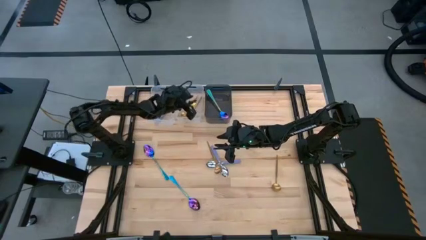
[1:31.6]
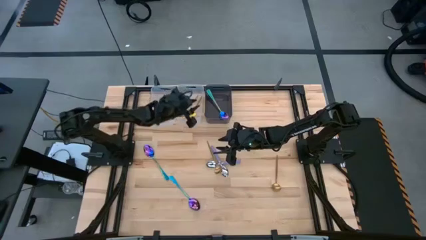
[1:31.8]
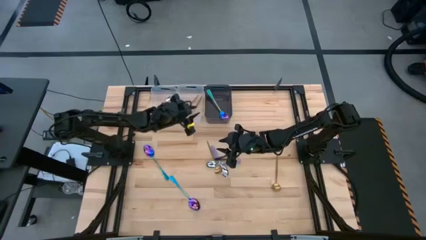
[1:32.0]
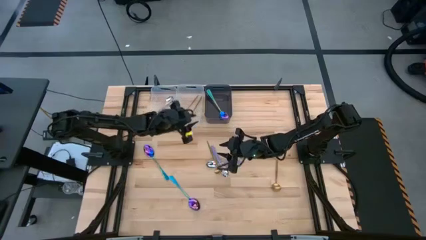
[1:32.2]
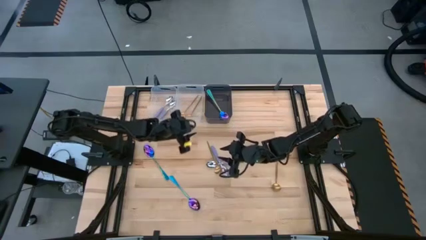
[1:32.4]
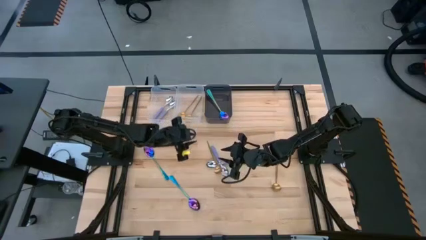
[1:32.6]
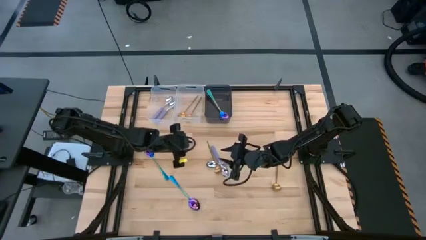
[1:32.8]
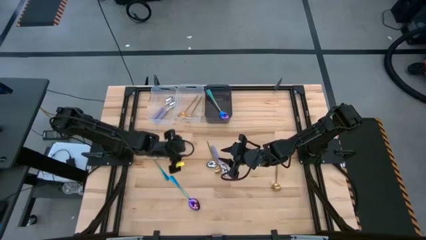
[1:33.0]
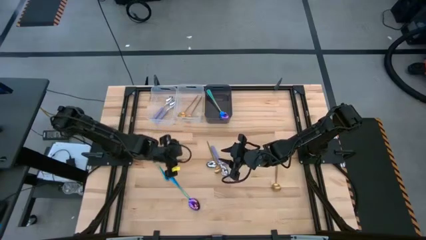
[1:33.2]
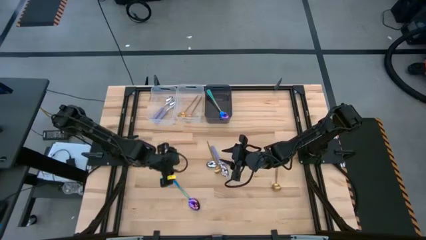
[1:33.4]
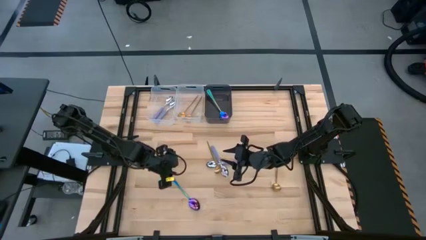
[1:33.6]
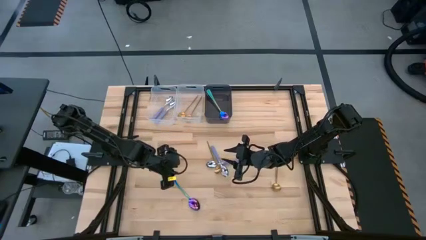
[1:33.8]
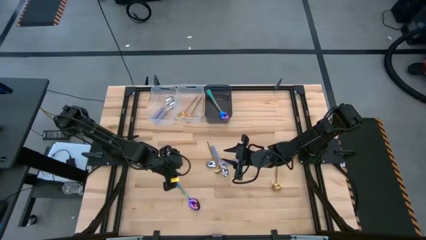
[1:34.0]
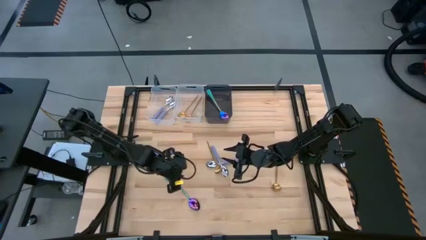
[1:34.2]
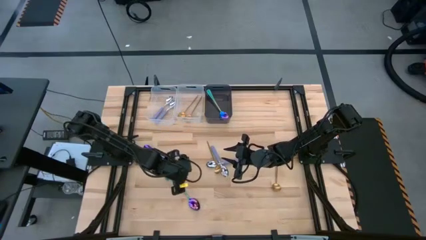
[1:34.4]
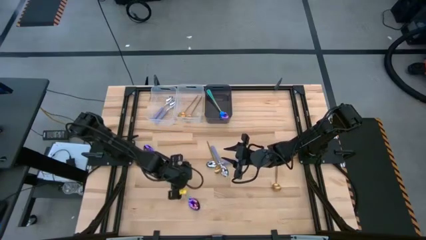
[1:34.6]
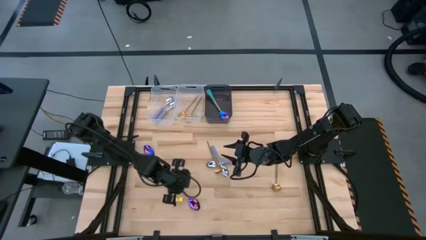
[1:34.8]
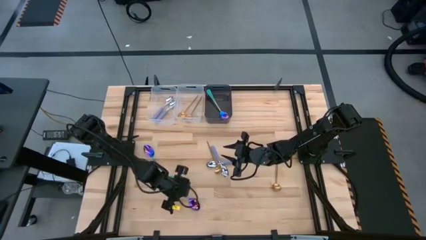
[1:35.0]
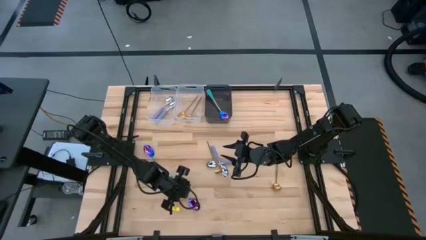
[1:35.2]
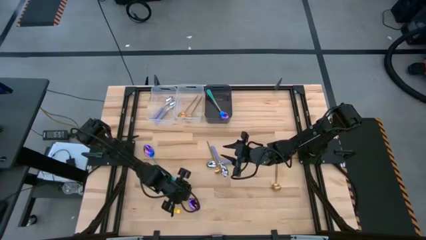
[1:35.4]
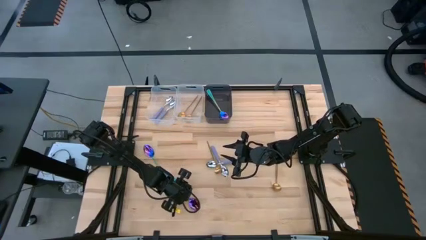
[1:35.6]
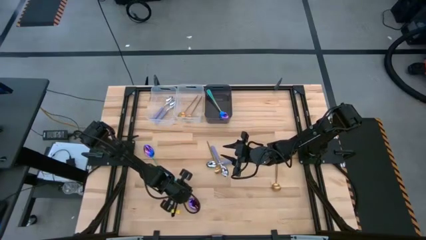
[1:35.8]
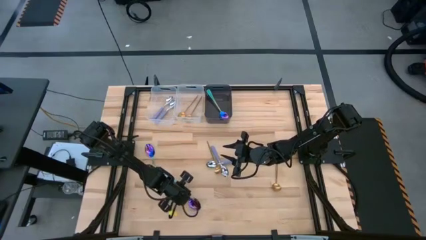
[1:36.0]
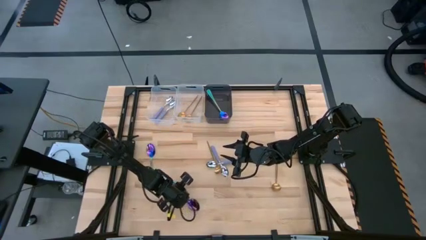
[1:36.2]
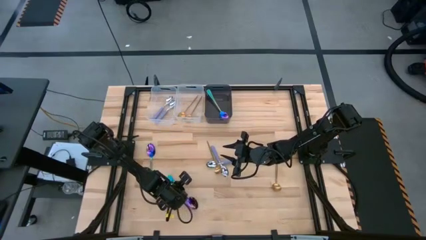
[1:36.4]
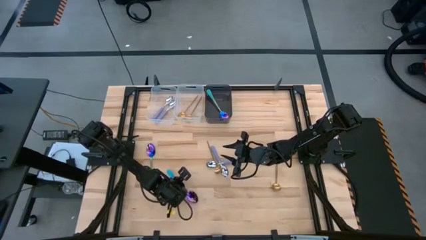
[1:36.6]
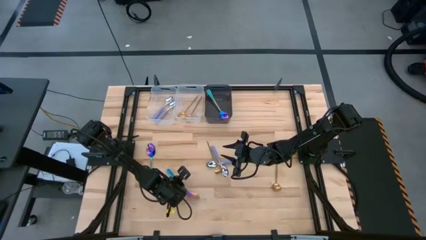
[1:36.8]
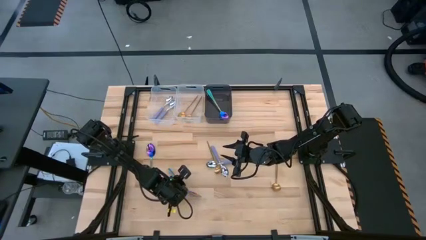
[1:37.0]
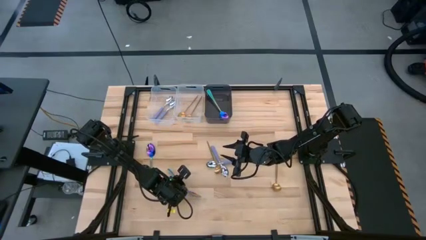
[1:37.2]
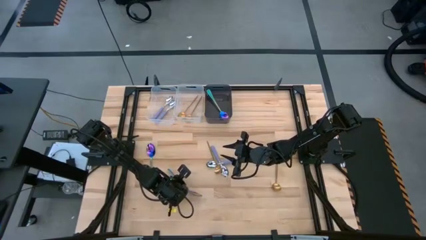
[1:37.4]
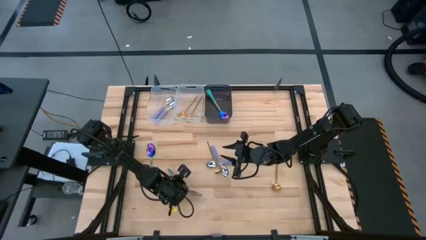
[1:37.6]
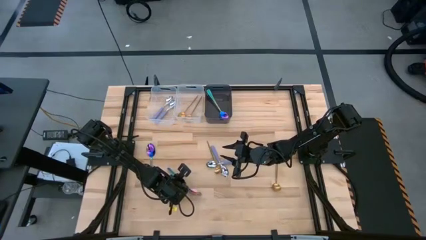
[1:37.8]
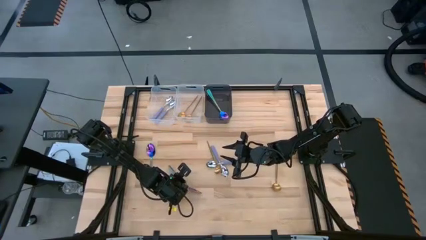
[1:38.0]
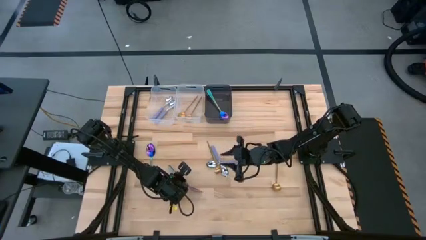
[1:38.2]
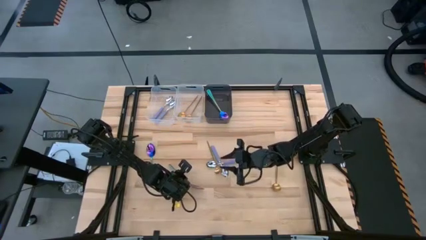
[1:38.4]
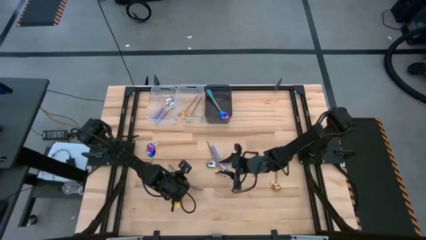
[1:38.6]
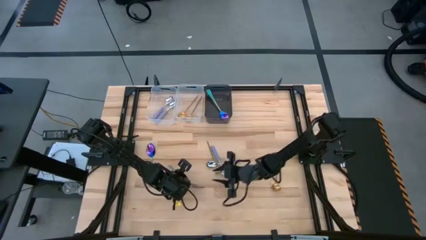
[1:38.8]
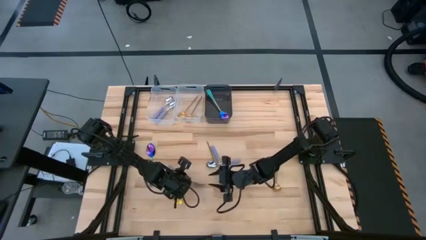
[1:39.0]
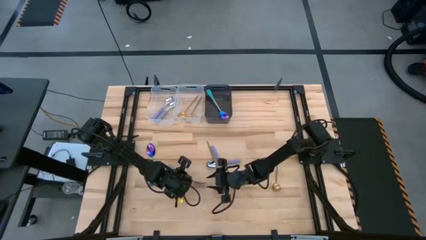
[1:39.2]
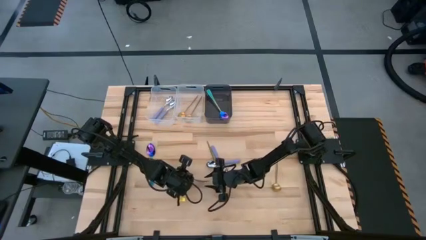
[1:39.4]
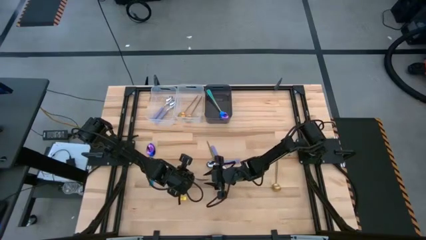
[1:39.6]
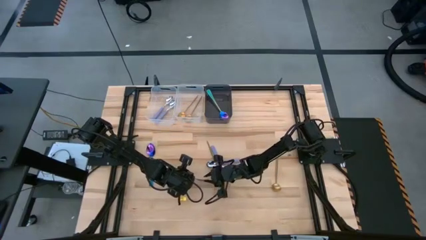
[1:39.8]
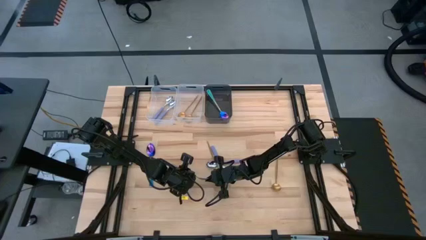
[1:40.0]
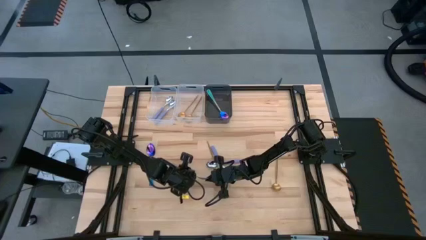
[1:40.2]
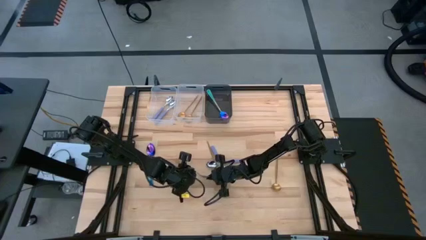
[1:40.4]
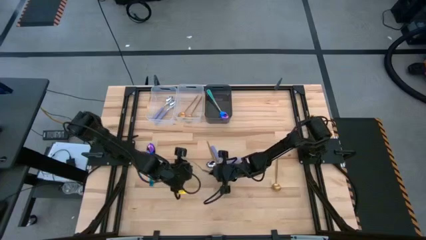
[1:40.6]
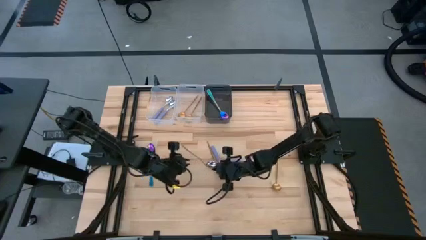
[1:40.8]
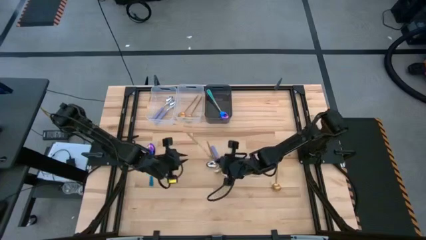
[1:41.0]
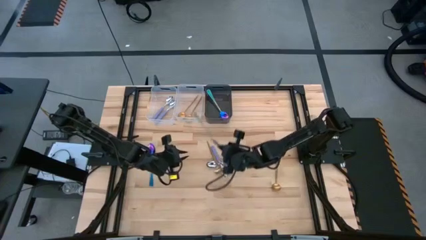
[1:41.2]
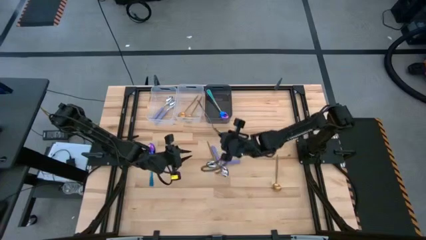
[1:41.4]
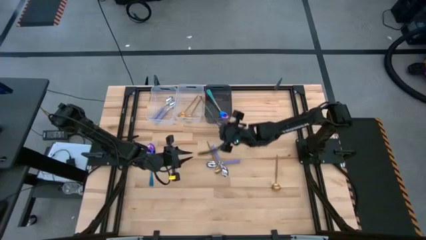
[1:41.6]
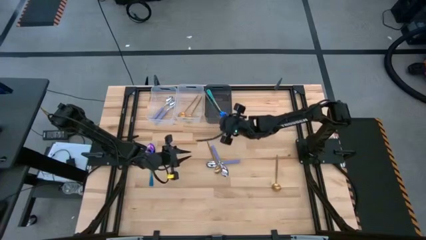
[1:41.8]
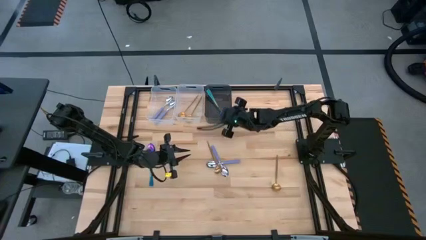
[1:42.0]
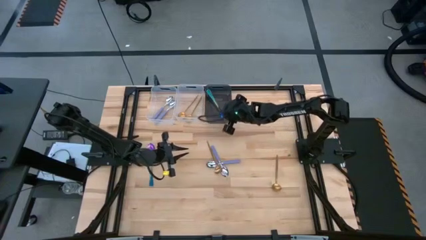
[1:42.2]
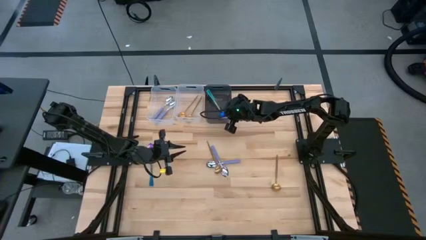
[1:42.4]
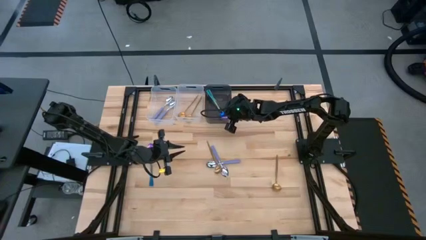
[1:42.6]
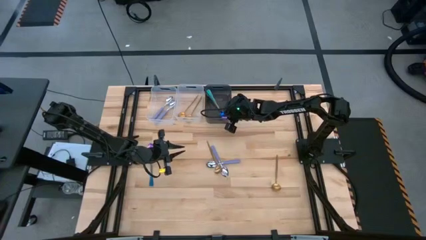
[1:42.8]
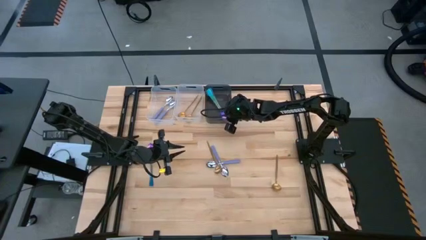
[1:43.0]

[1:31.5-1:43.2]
Task: Sort silverware by color (type)
Put the iridescent spoon into the black bin

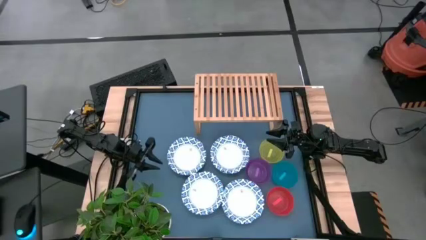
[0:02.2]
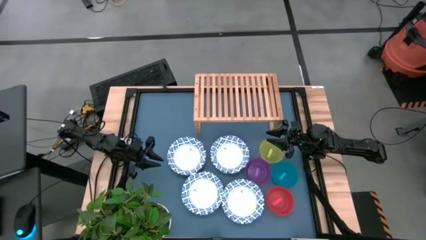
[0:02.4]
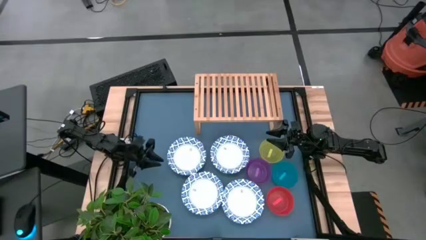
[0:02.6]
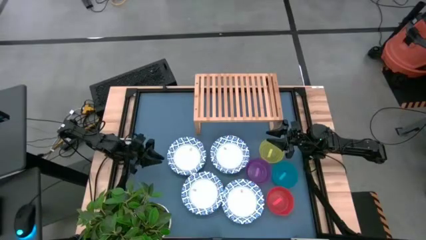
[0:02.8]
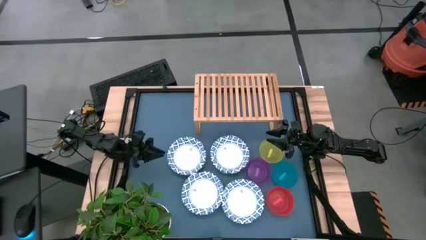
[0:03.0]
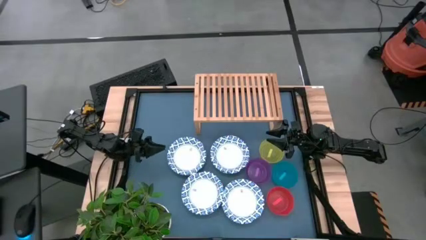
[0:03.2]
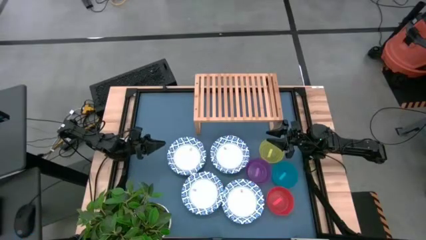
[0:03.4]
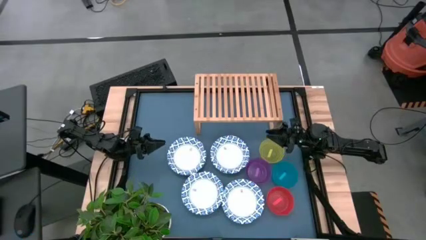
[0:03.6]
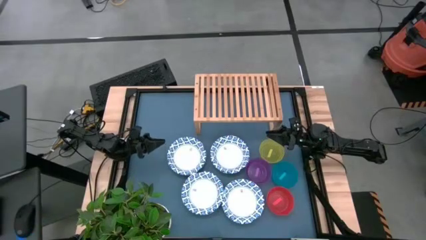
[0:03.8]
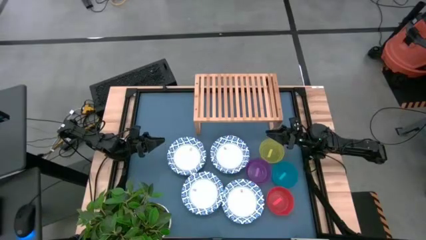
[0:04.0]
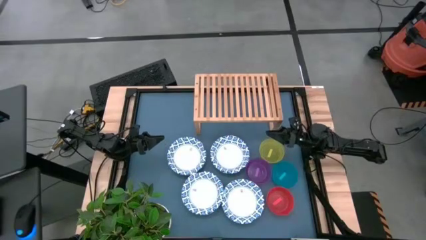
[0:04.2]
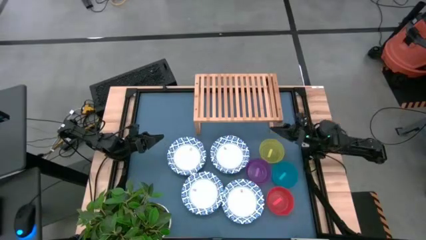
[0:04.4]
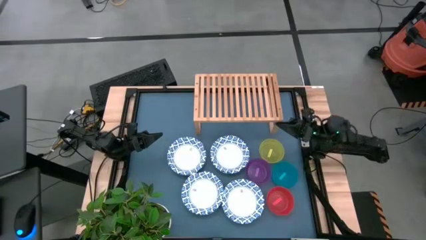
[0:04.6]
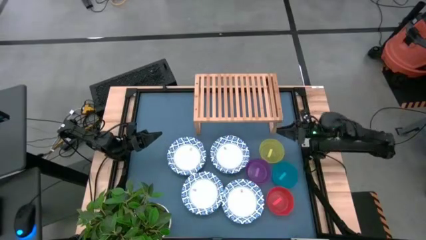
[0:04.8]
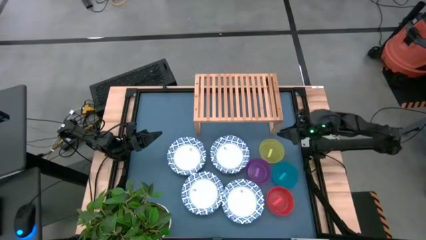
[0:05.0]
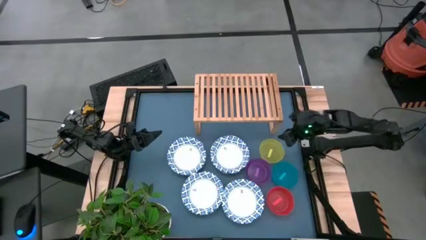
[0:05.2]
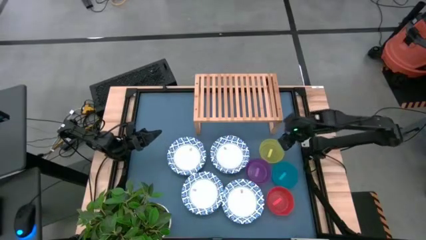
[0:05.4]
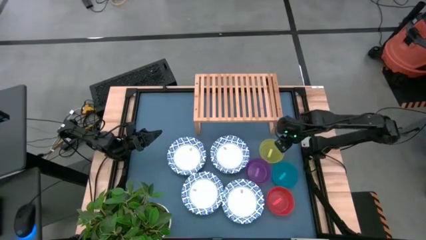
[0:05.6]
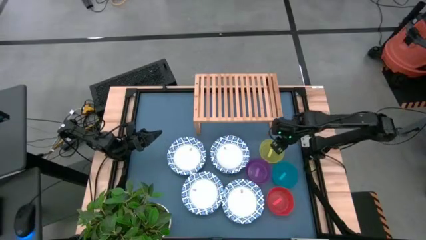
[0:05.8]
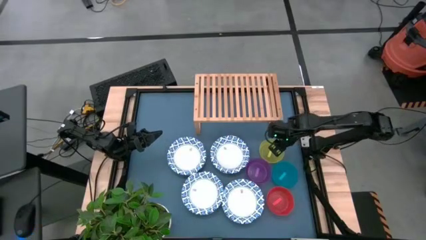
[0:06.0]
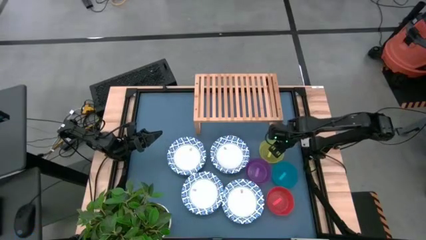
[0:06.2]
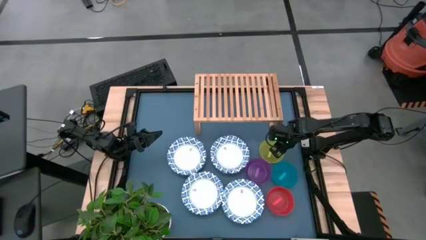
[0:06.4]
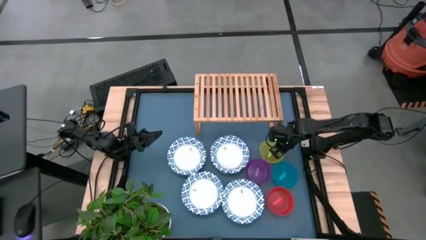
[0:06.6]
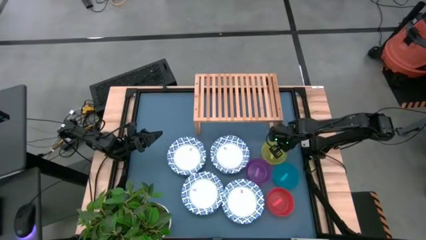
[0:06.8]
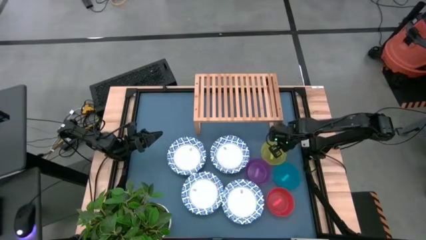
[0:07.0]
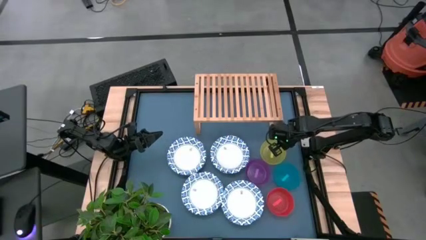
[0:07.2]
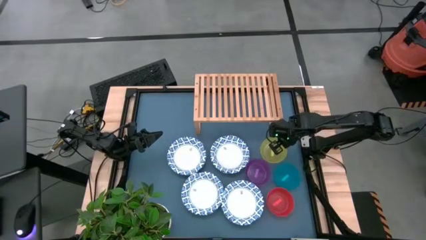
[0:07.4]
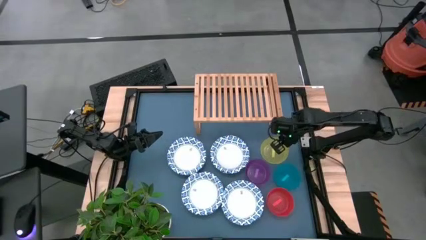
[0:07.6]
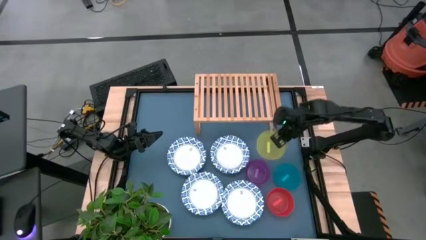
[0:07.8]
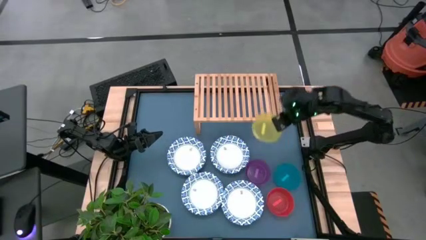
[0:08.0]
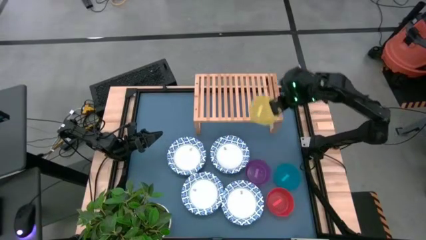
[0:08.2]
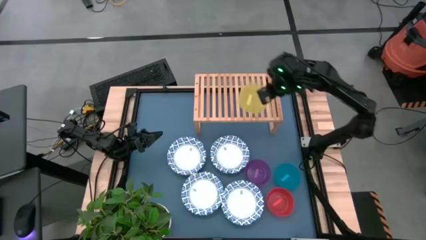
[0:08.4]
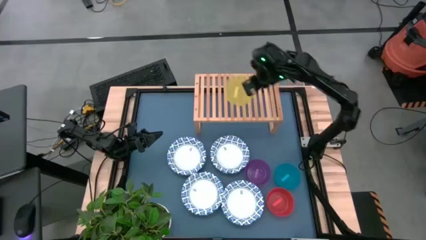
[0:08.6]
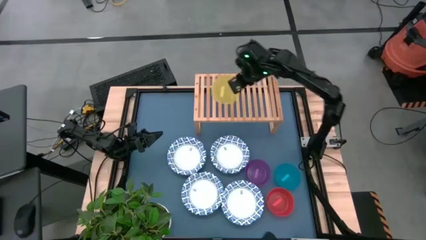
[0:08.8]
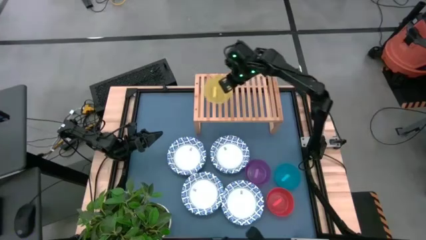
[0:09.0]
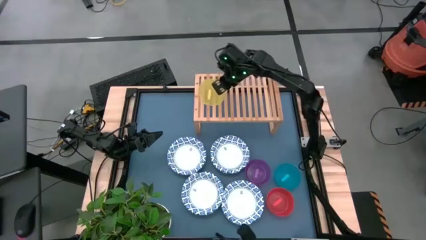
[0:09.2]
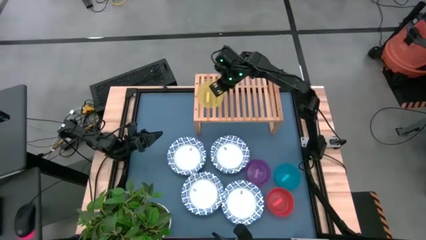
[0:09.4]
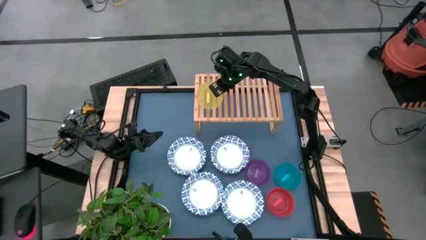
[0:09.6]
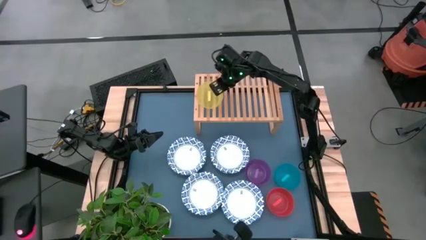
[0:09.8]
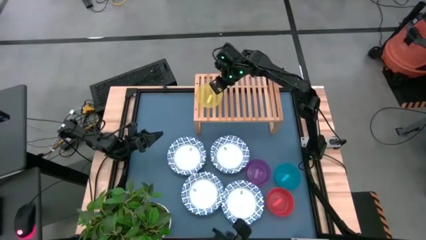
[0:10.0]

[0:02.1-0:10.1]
Task: Place and stack bowls onto a shelf
Put the yellow bowl on the shelf
